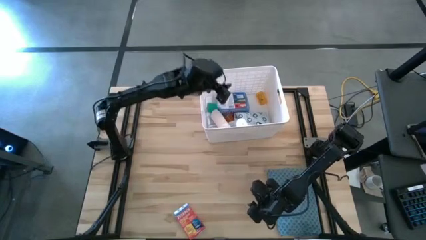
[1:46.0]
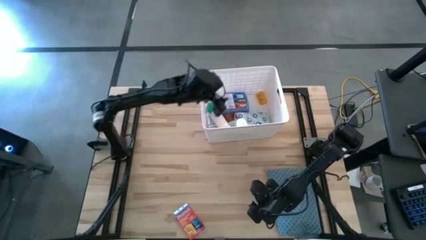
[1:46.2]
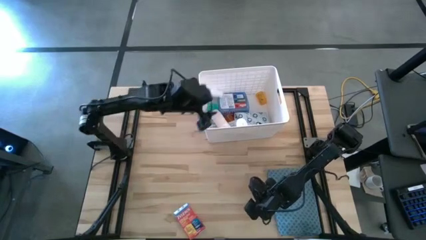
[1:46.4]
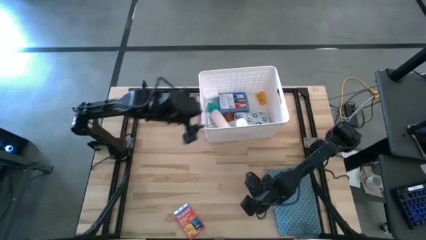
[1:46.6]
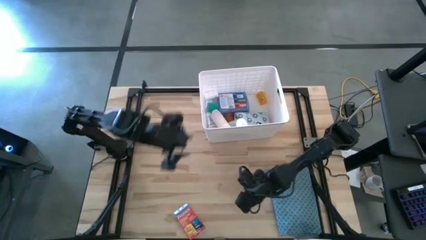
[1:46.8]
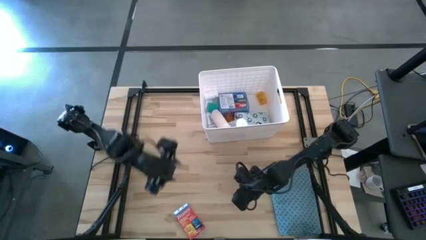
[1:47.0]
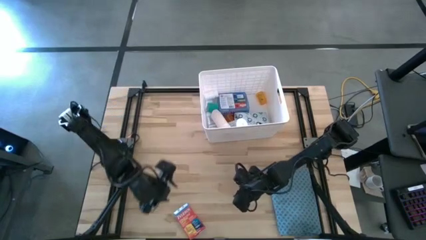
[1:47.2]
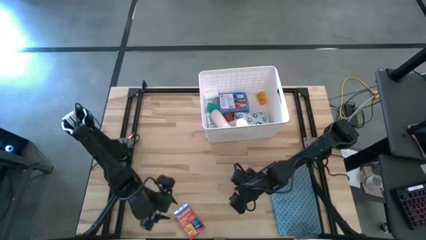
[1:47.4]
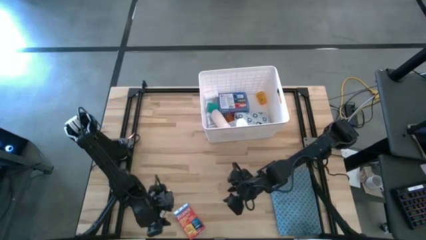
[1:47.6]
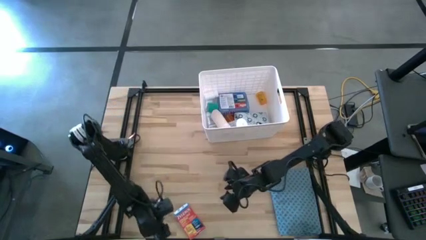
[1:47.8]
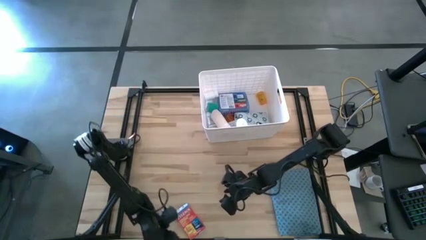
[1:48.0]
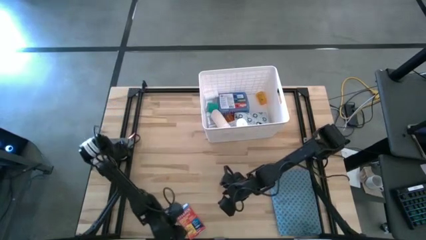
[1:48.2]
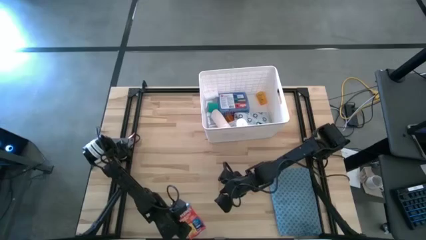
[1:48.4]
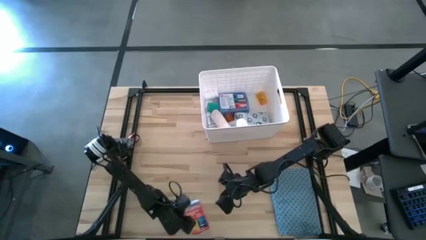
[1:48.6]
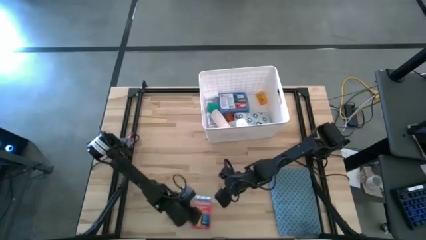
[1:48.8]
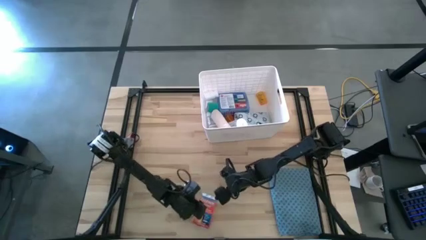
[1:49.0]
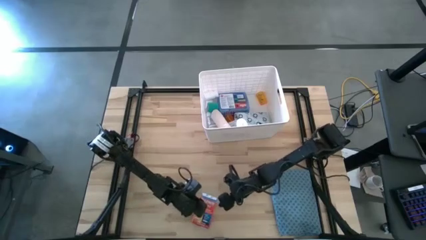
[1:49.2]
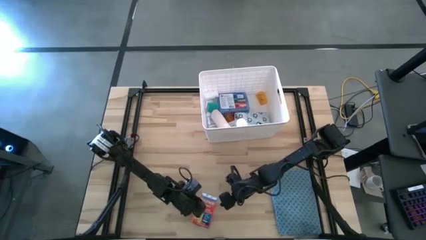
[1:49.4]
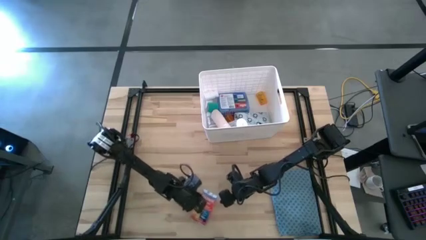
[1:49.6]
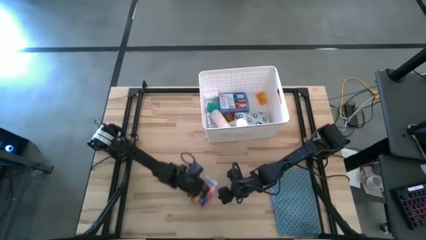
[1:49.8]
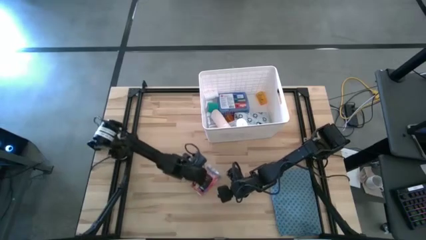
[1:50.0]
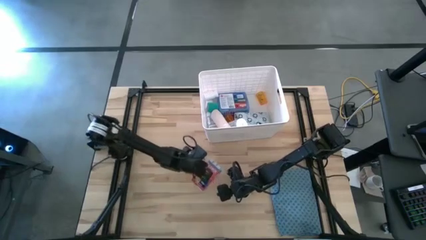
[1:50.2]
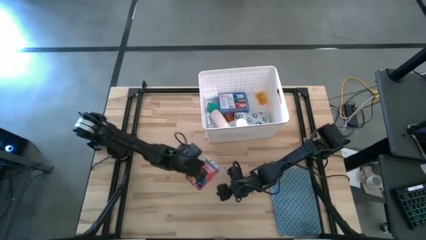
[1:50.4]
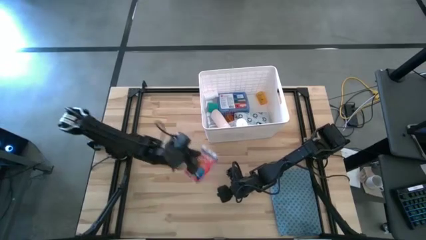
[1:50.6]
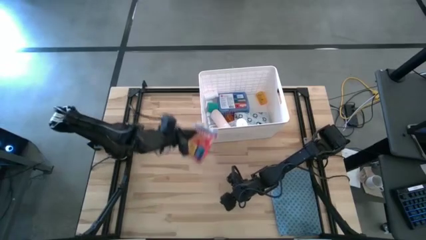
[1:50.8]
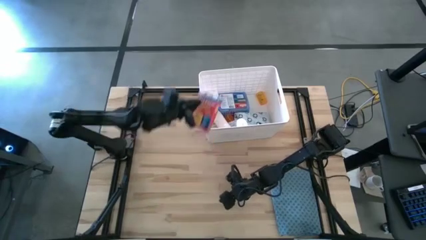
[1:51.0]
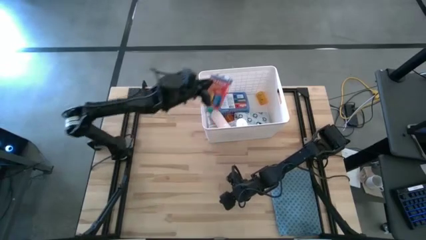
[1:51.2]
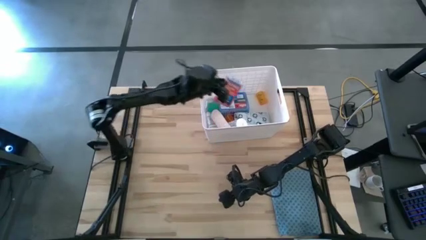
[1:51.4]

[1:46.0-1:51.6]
Task: Pick & place medical supplies in basket/bin
Put the red medicine box into the white bin

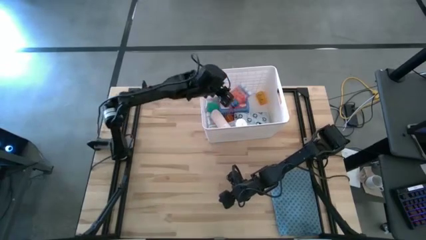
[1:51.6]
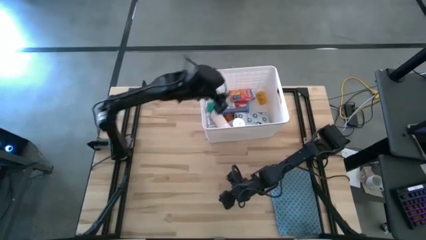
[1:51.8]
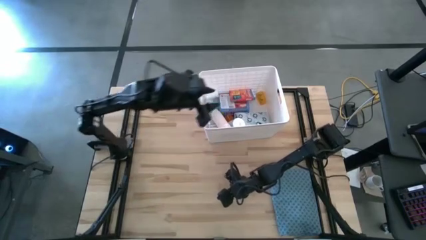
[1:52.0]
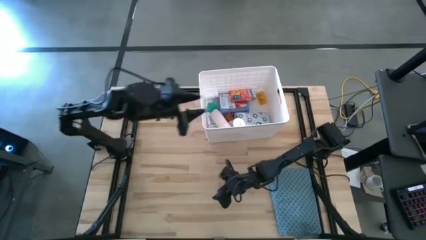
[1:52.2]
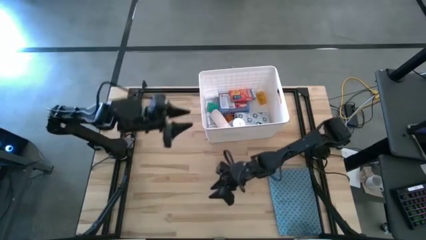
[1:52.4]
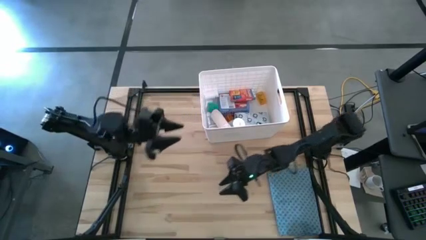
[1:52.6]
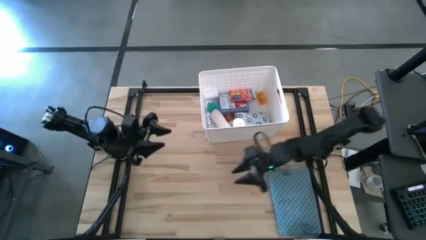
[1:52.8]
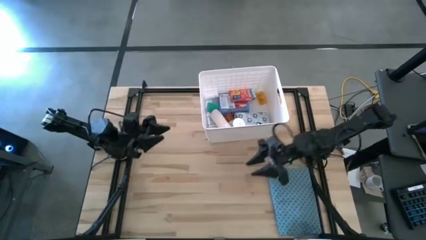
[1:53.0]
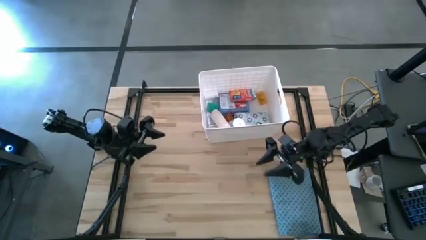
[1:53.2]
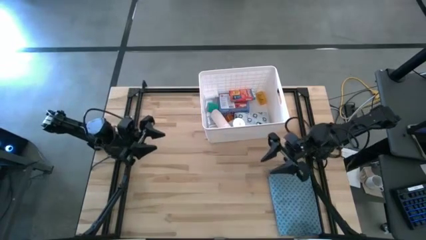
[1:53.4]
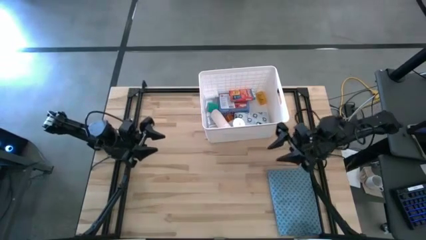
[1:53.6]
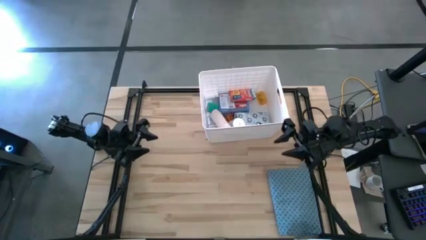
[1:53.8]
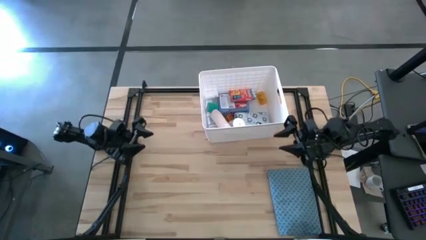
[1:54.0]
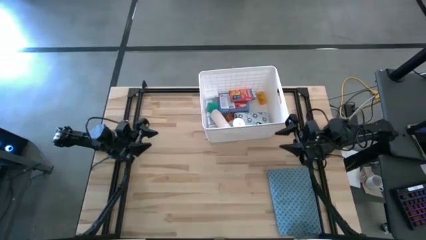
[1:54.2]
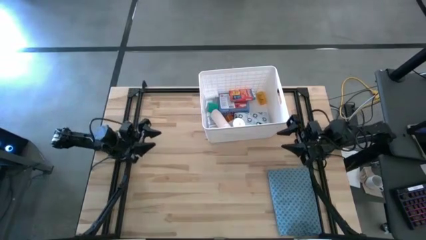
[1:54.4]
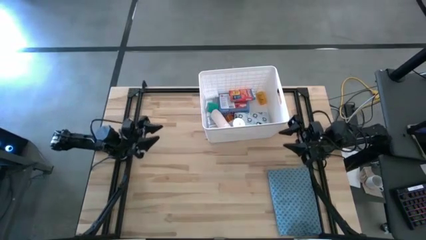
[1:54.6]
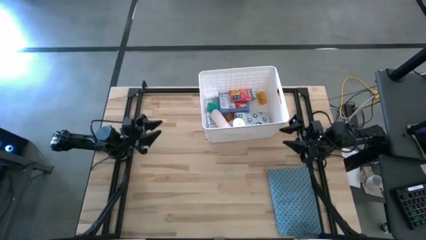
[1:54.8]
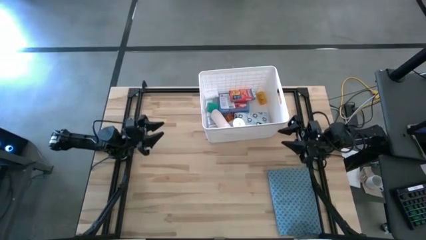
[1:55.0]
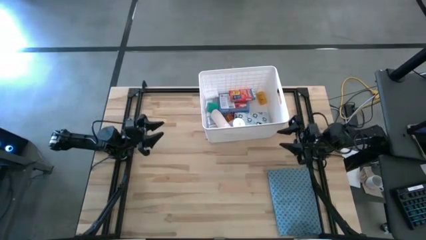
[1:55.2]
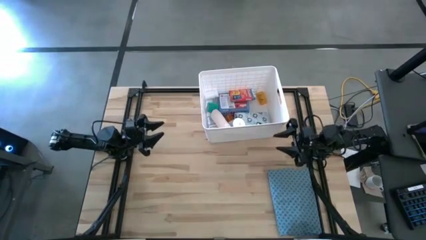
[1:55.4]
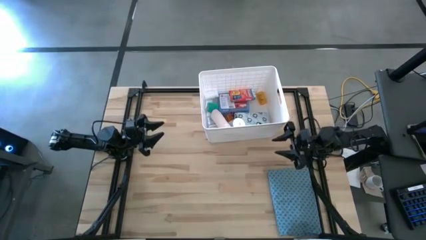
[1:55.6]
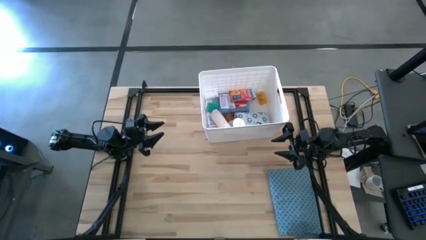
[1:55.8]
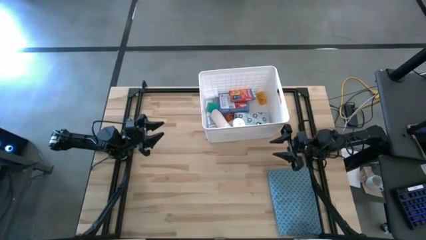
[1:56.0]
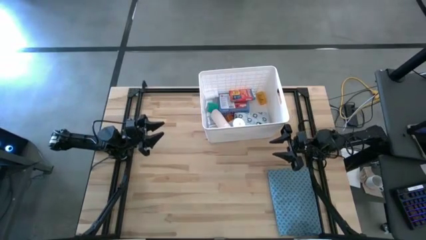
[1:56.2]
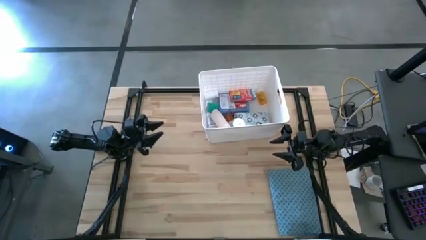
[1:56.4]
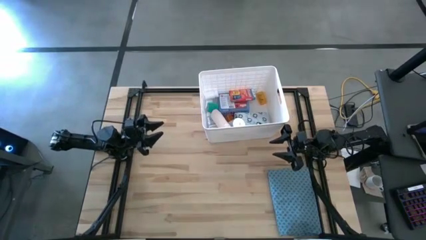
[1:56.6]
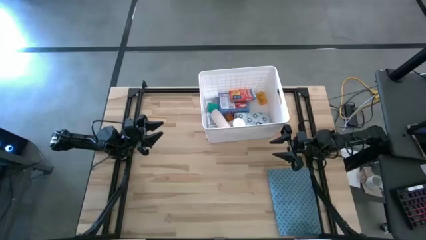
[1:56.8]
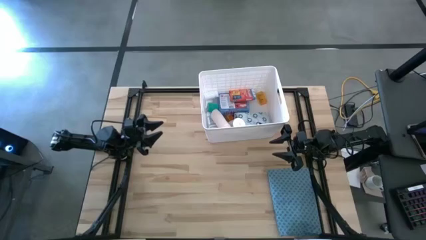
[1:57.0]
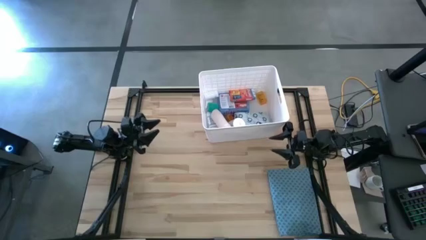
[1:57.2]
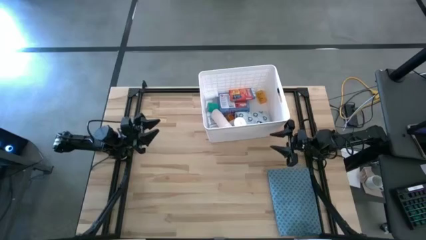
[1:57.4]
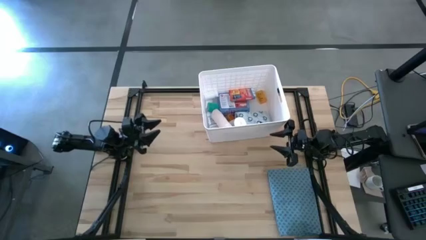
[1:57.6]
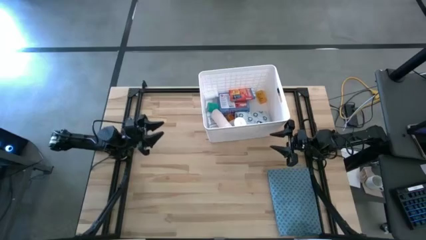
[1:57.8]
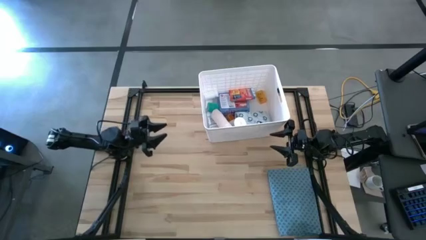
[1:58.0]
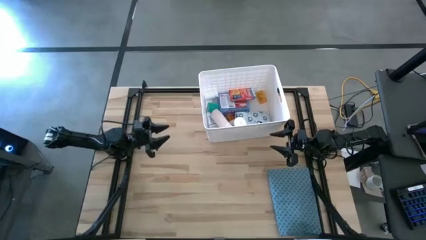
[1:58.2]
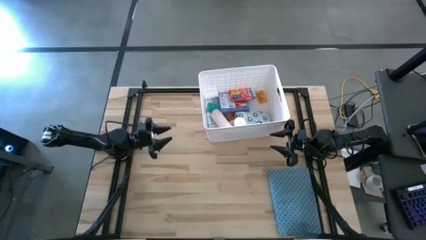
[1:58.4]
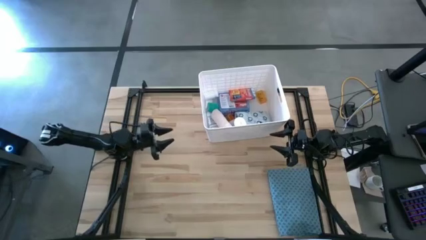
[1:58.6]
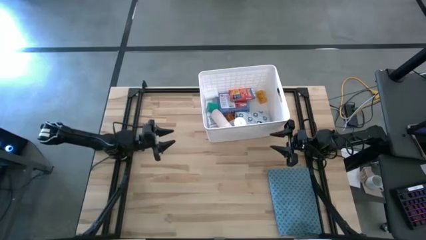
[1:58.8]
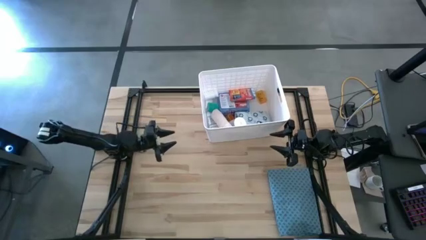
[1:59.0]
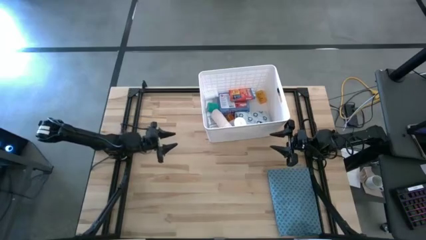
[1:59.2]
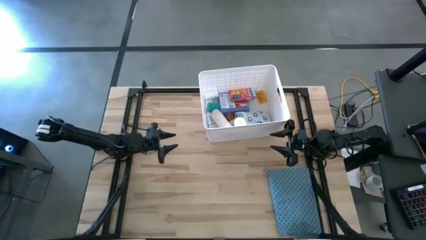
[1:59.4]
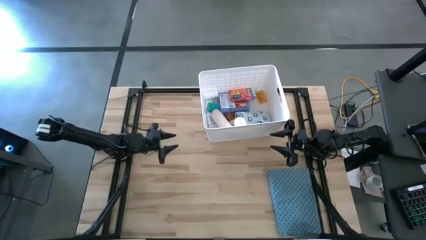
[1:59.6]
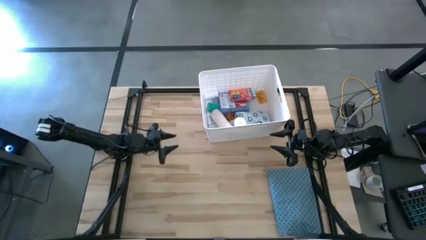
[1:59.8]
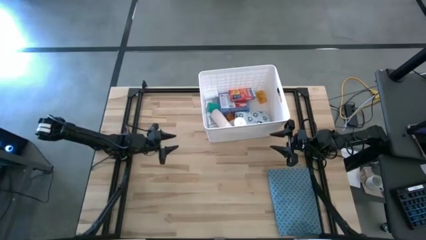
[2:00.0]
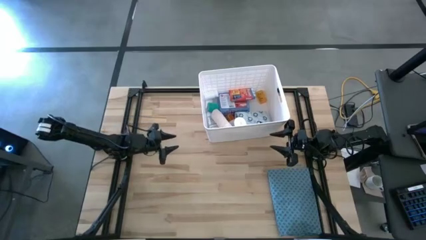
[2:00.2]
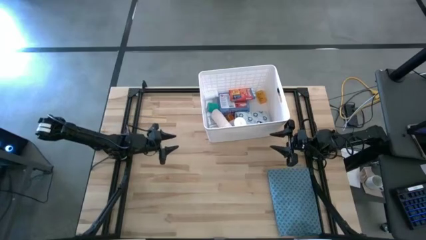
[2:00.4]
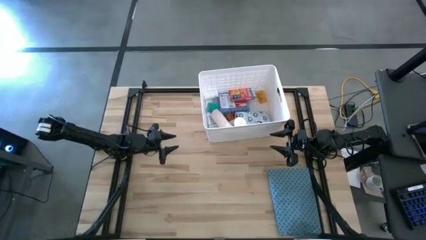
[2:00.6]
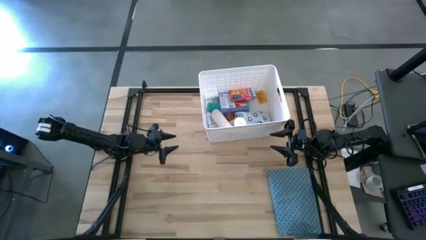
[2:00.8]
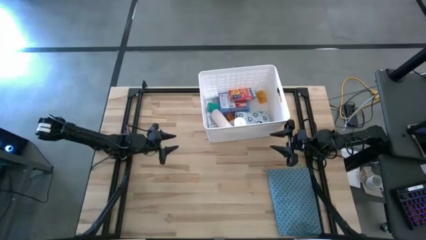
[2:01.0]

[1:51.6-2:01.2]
Return to Home Position

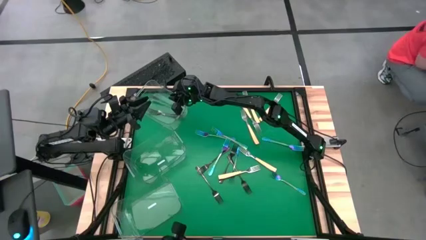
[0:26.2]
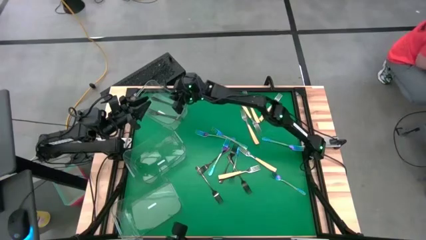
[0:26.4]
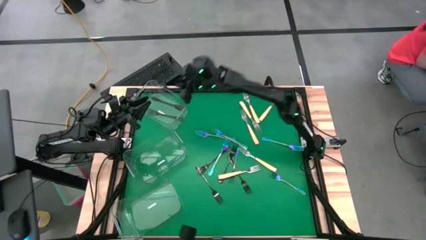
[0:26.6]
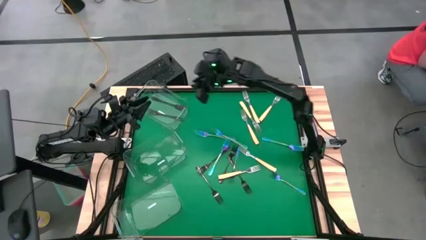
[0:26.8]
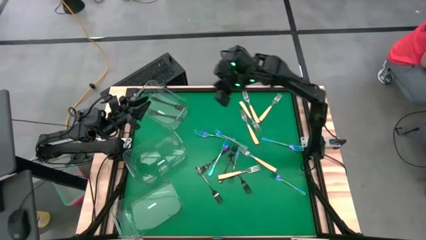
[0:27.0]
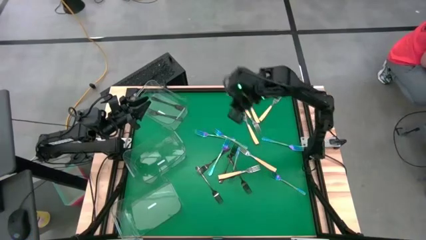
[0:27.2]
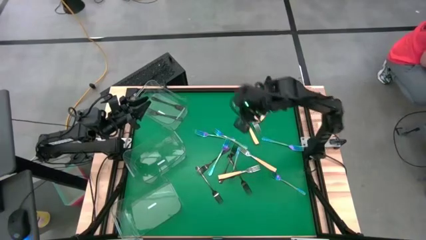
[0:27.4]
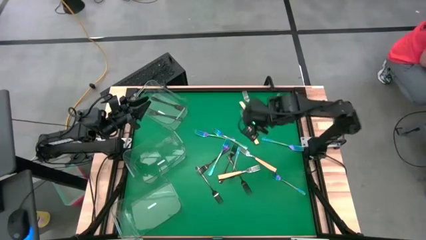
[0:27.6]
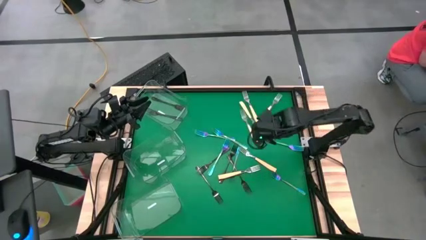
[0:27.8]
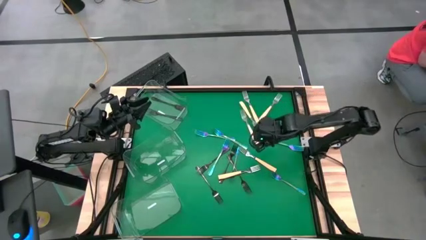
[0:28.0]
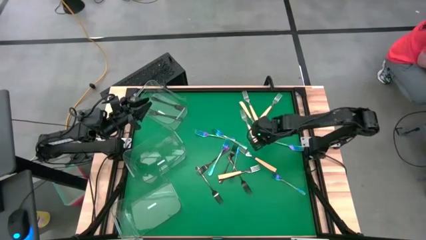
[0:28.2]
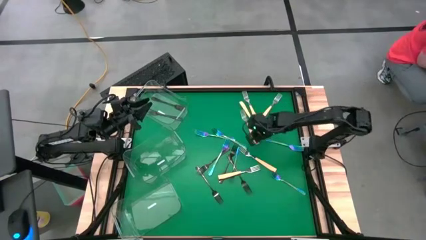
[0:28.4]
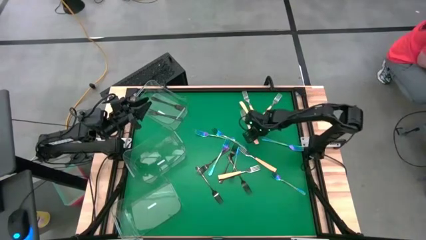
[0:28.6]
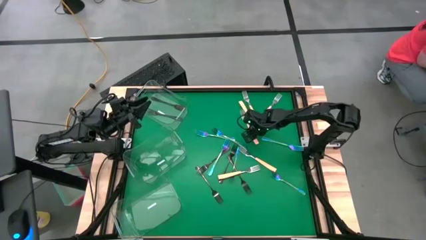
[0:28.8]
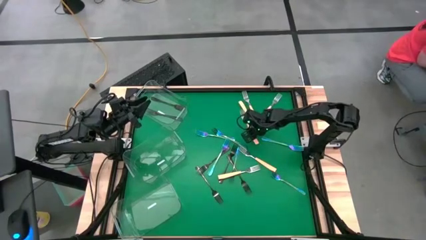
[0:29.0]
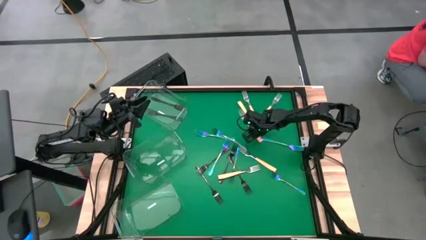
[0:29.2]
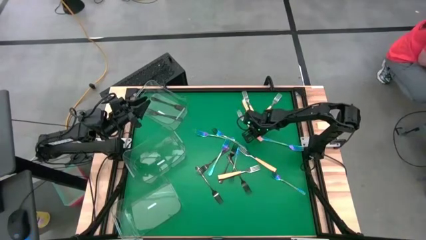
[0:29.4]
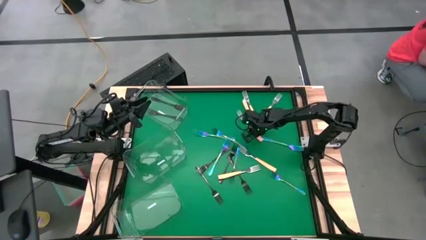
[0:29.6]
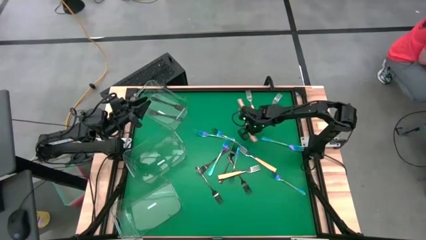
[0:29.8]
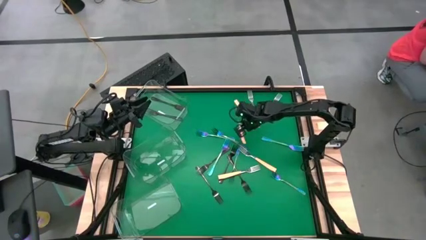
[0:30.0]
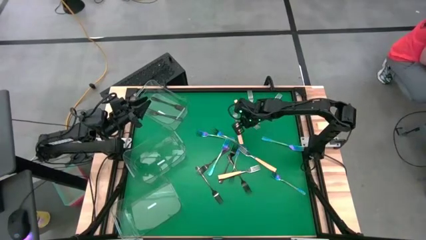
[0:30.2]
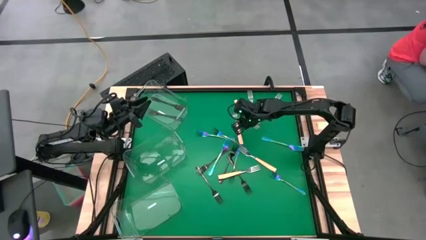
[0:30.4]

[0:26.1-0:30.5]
Task: Sort silverware by color (type)
Put the orange fork into the middle transparent bin
